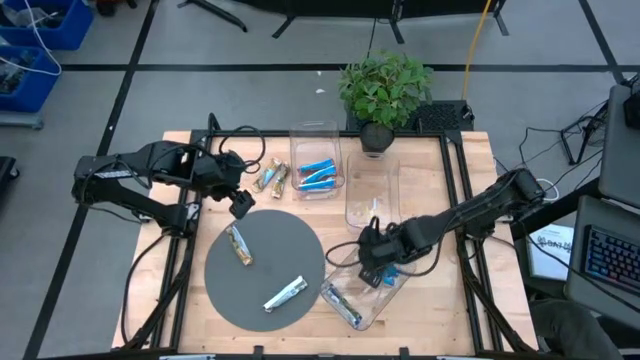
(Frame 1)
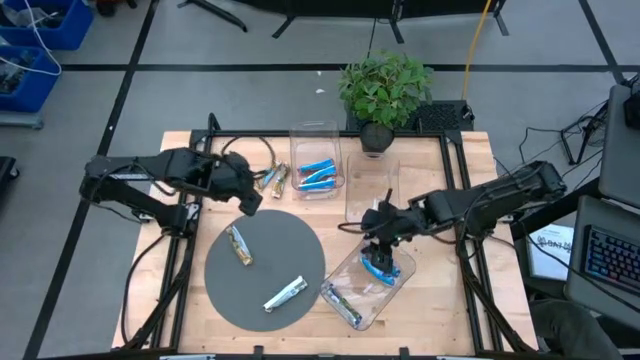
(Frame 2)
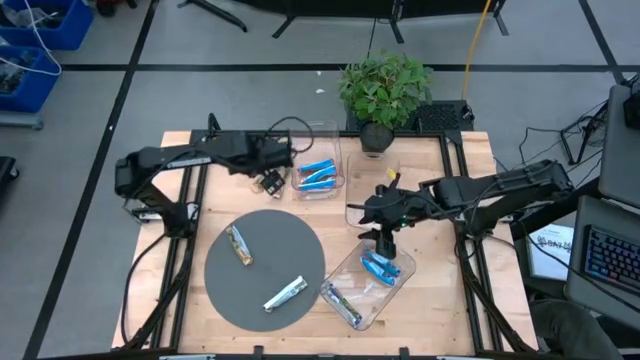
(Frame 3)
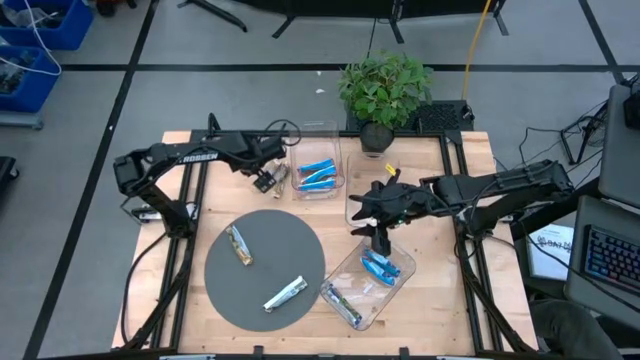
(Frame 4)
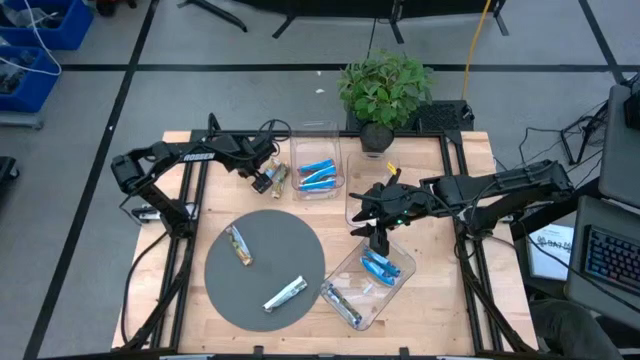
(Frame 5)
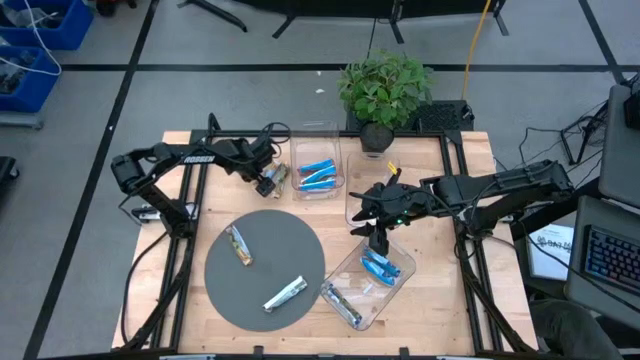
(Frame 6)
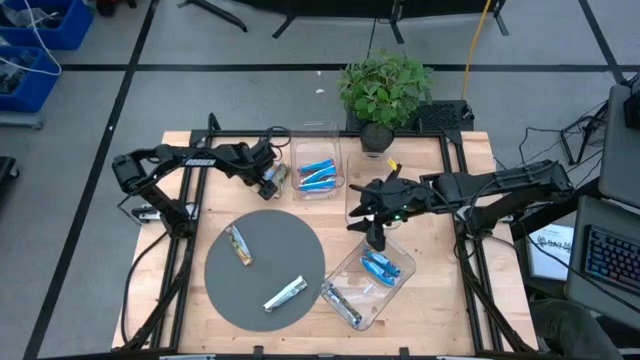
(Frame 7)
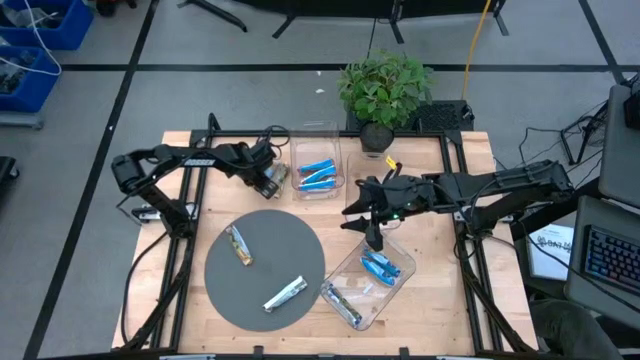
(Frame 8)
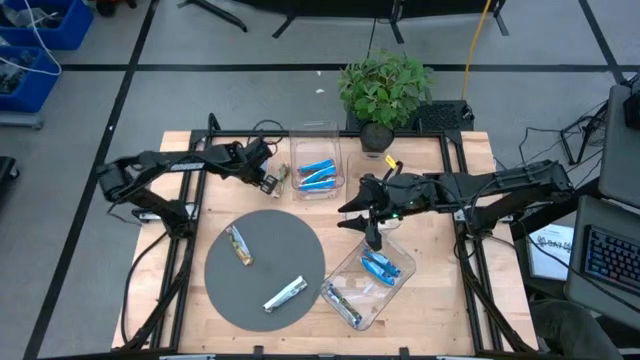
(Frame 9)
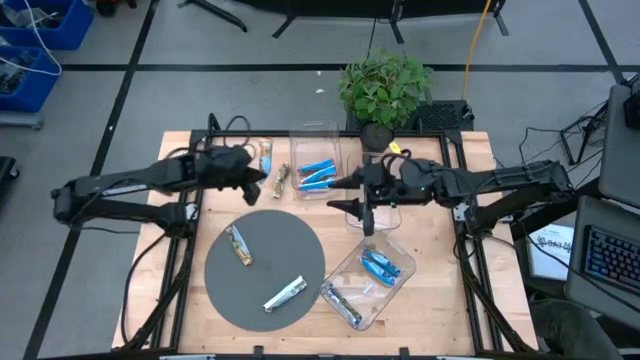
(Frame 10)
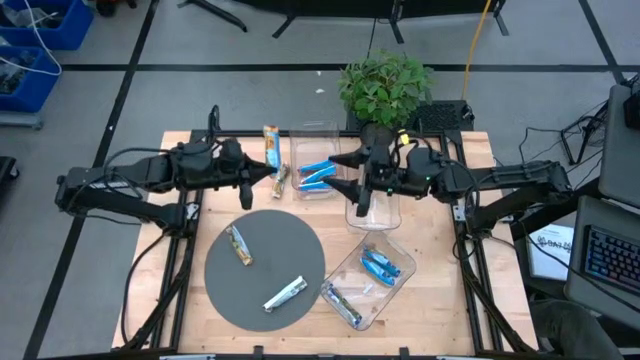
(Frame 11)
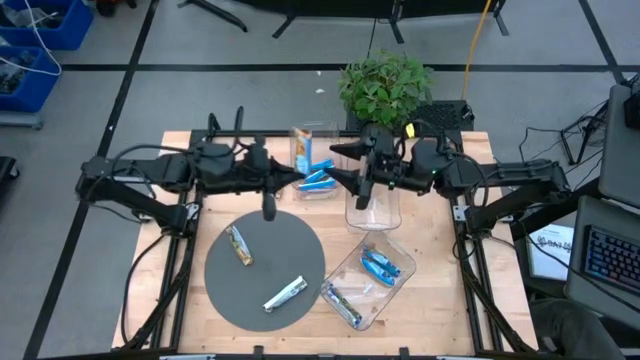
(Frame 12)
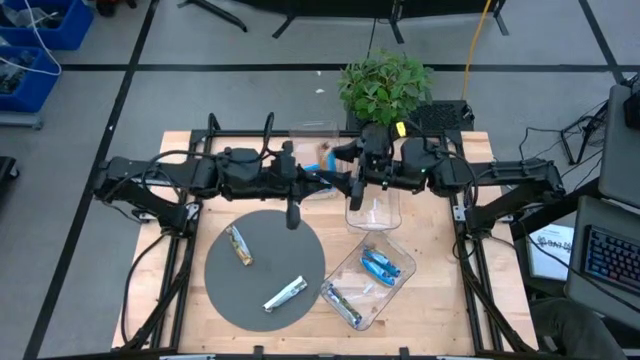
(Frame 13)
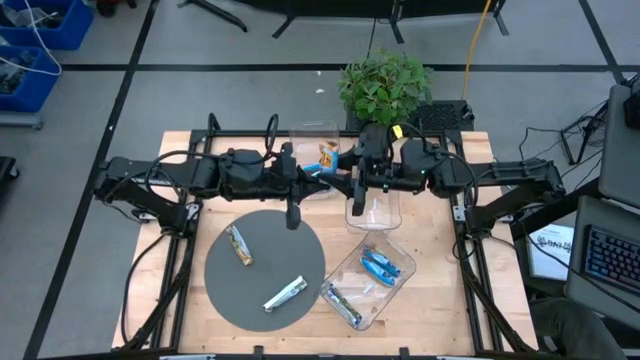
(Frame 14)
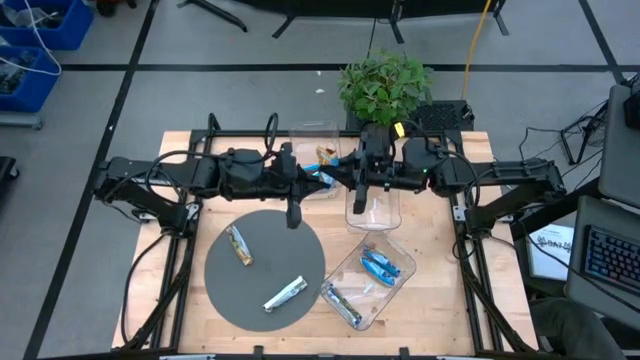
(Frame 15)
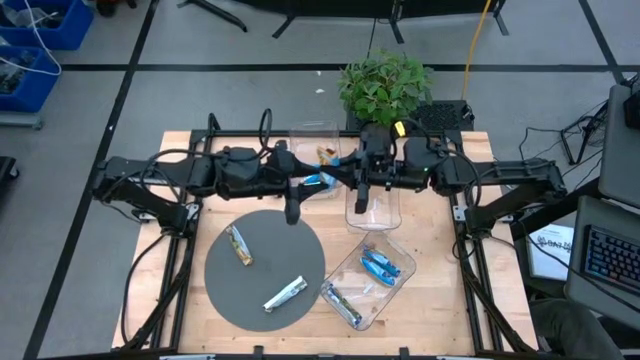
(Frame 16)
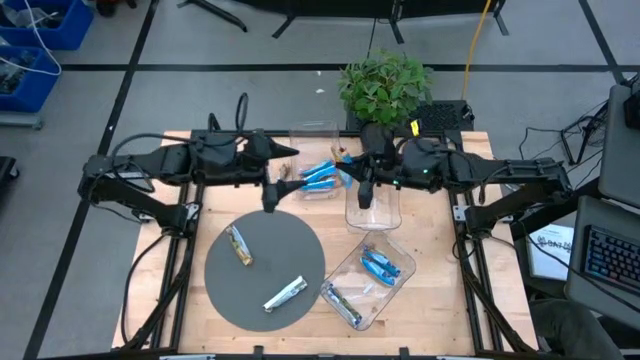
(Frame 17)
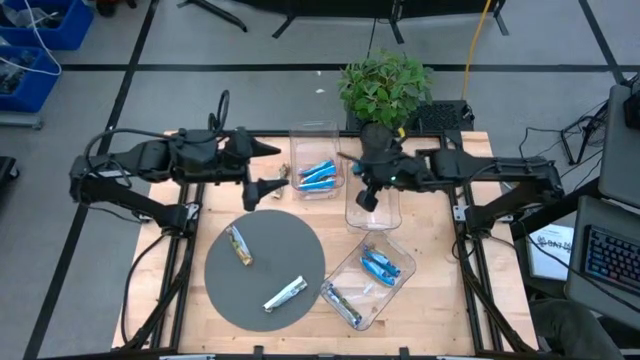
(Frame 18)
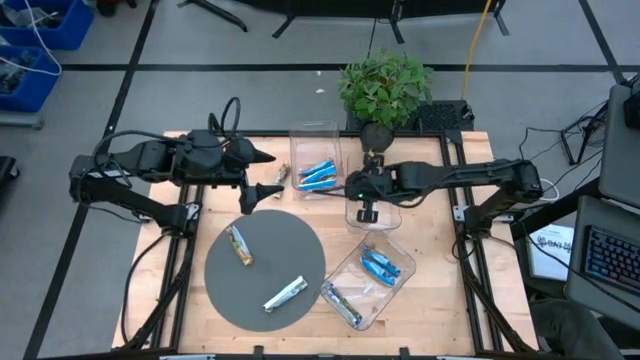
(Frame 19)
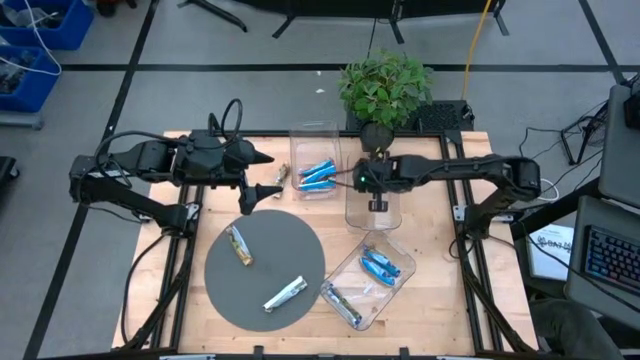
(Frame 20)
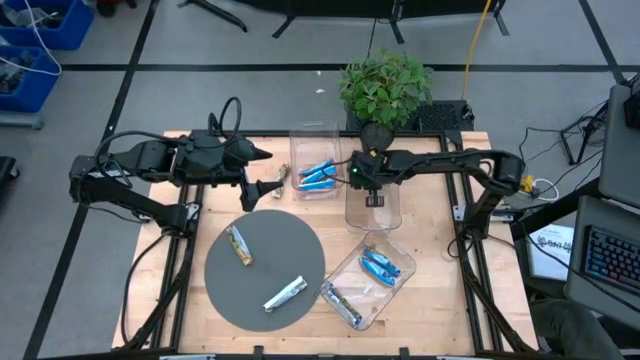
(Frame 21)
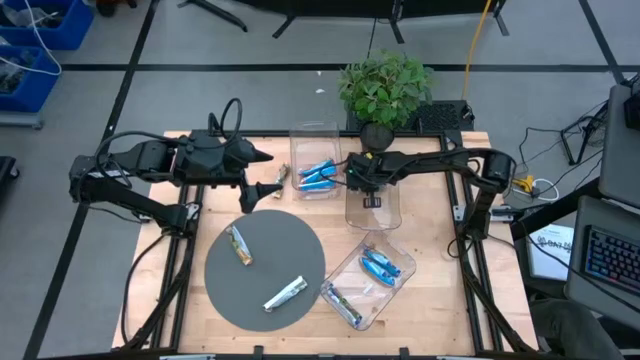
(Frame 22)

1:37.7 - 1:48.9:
Task: Pick and place Granola Bars by type
Put the yellow granola bar into the middle transparent bin

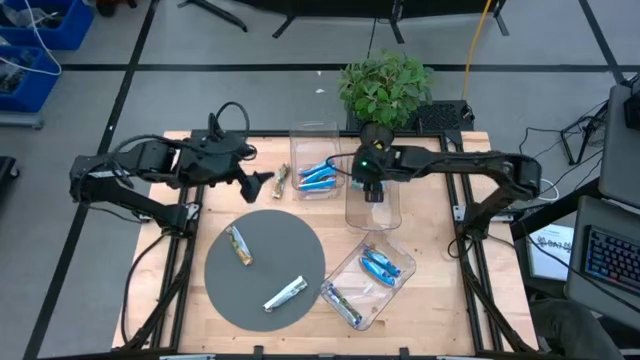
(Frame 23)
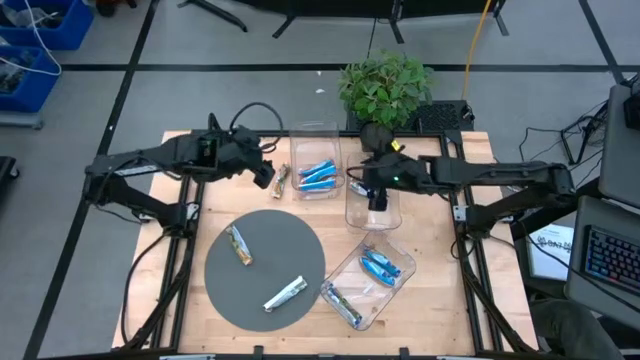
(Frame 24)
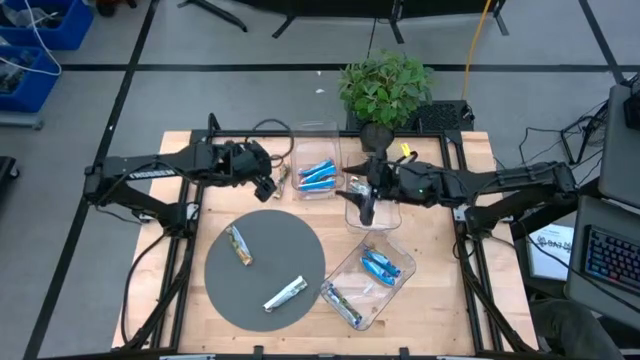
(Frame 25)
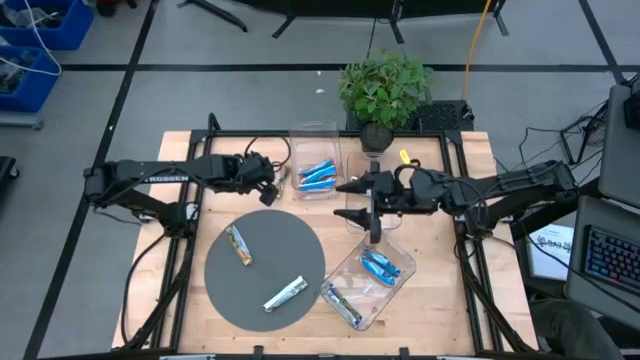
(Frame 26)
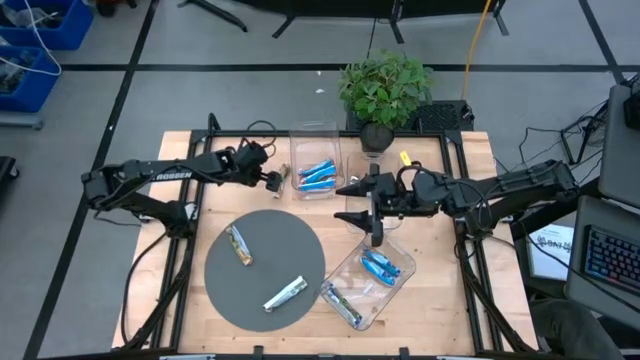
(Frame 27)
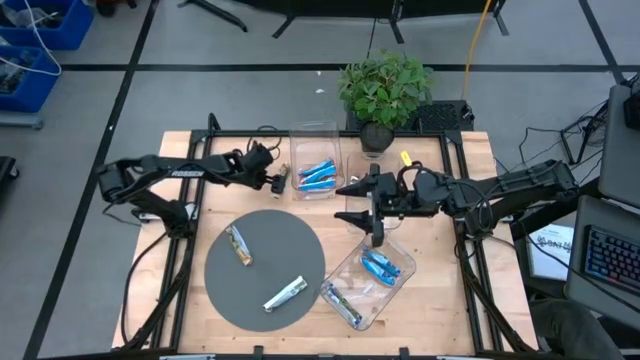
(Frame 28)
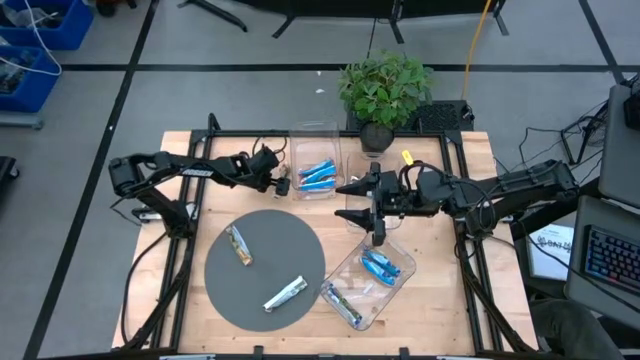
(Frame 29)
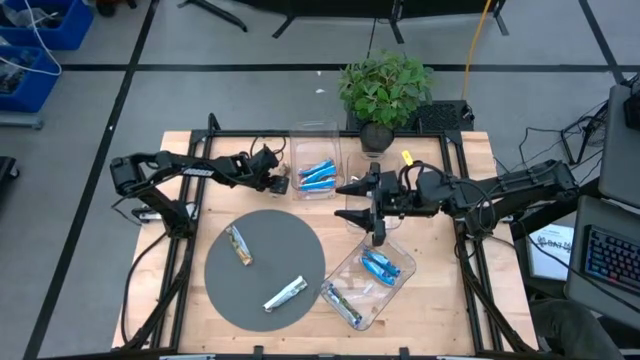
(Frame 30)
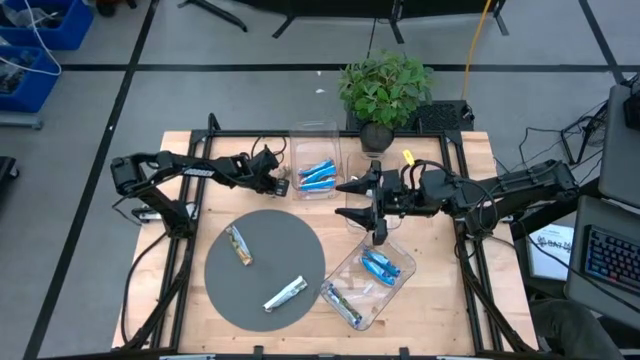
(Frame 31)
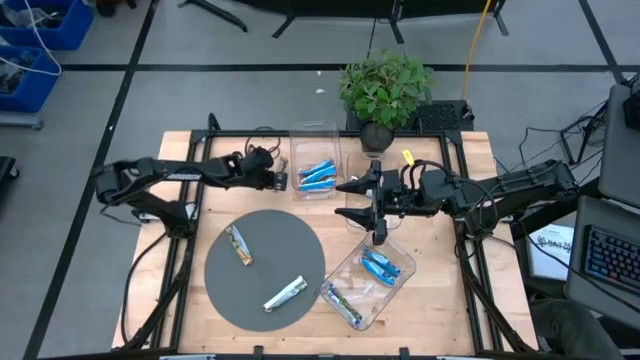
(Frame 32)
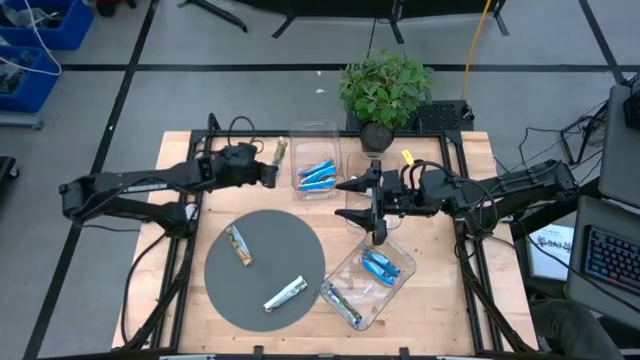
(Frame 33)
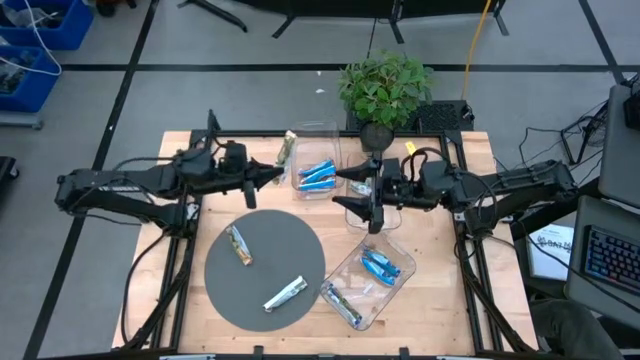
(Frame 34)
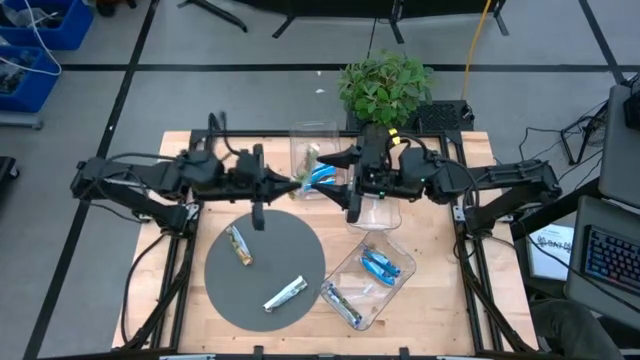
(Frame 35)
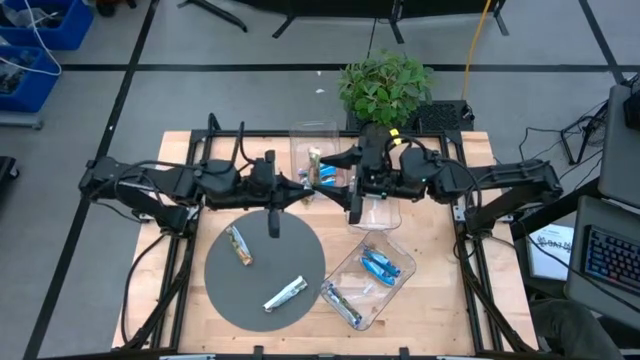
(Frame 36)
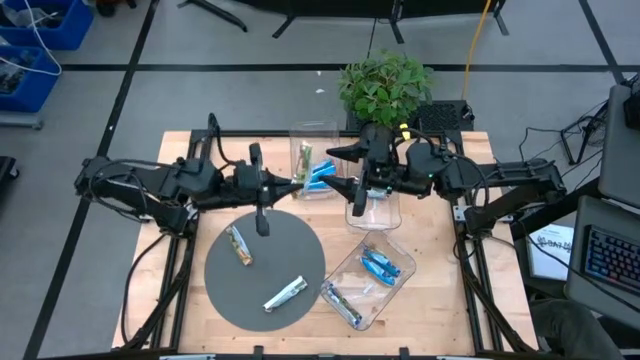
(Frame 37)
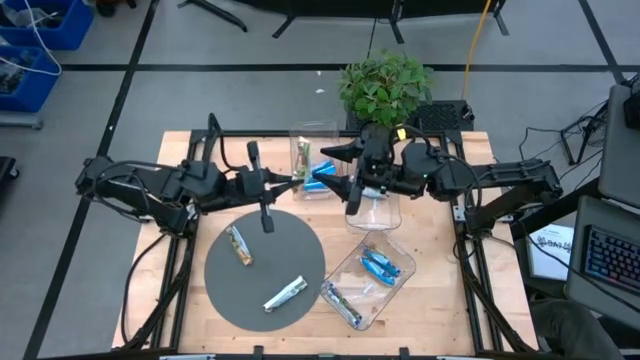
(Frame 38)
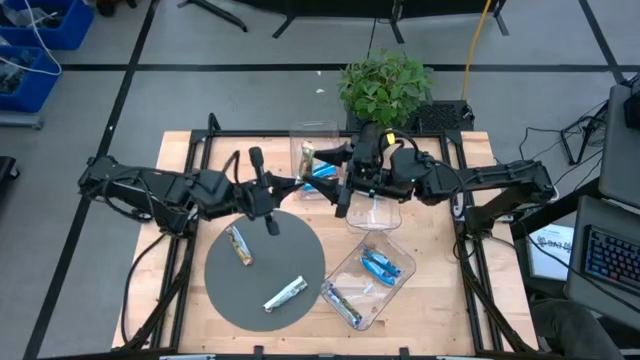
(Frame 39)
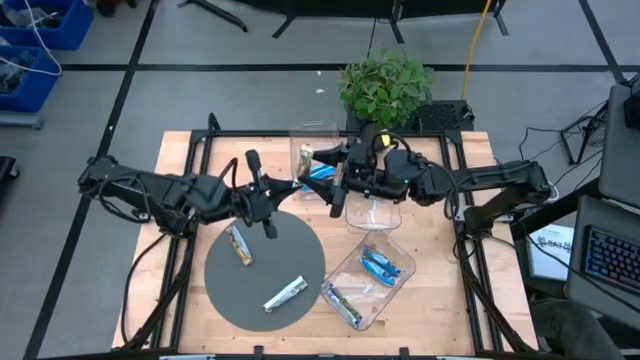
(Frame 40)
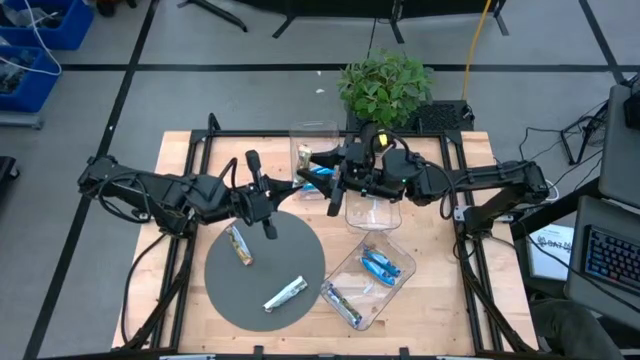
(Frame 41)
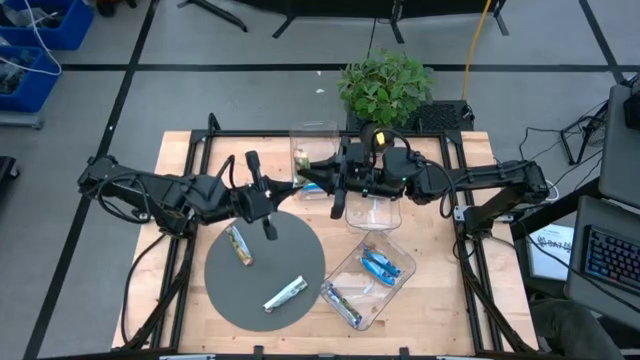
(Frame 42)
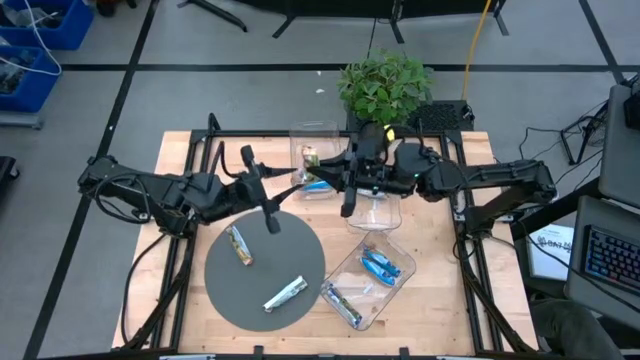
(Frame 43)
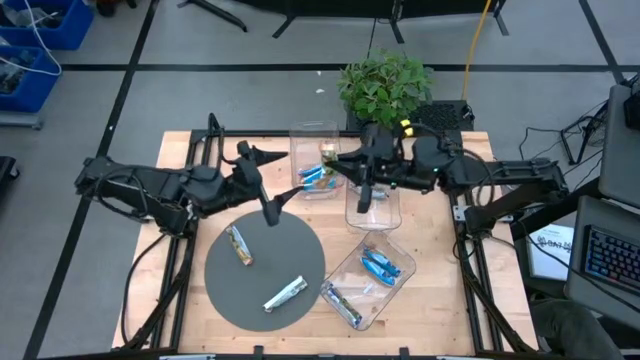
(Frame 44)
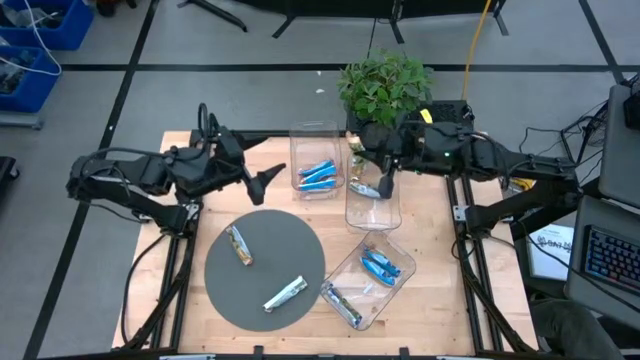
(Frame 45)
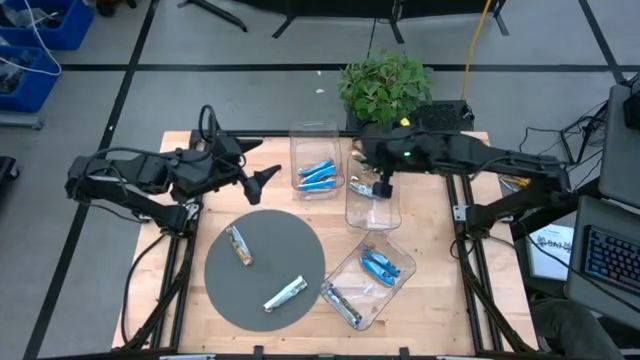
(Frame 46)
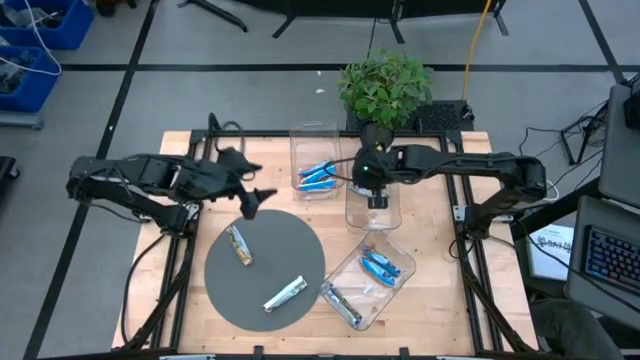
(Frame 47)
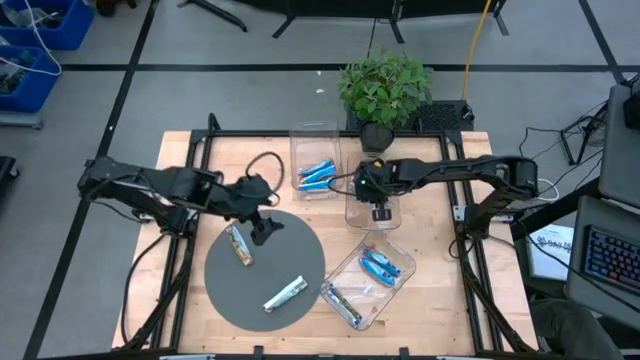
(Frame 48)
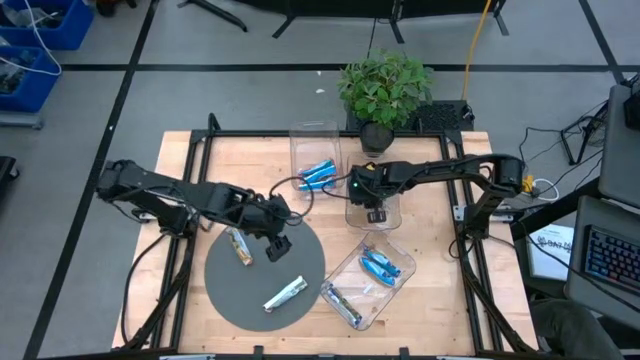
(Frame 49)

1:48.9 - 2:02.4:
Put the yellow granola bar into the middle transparent bin
